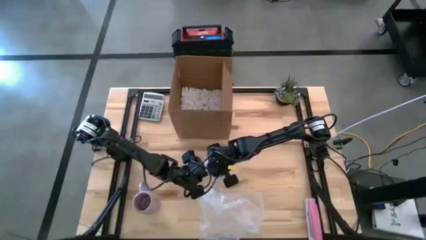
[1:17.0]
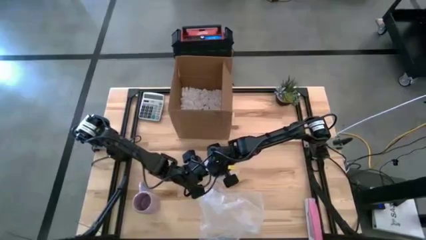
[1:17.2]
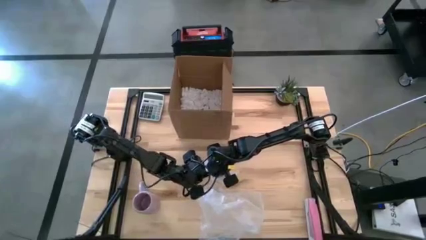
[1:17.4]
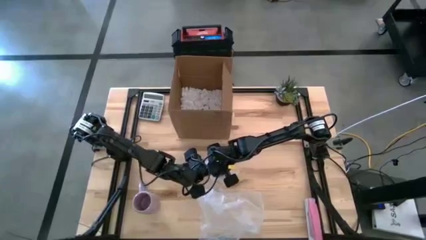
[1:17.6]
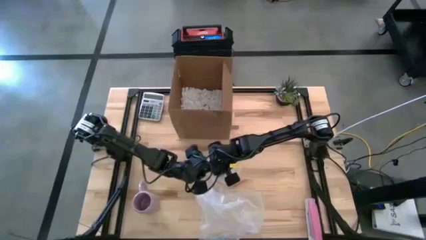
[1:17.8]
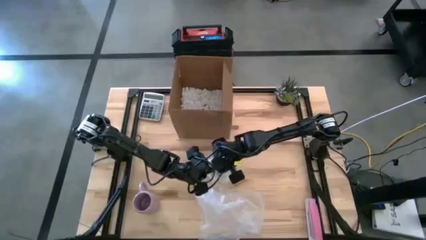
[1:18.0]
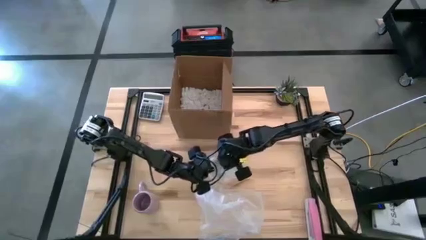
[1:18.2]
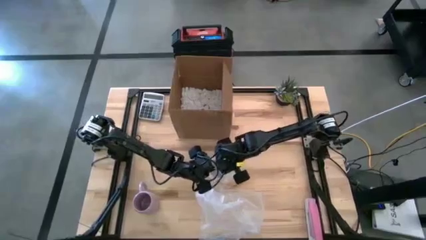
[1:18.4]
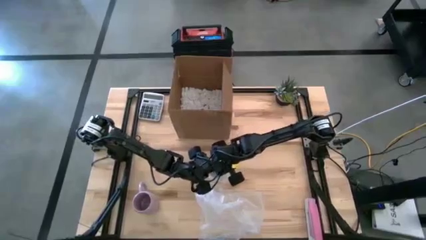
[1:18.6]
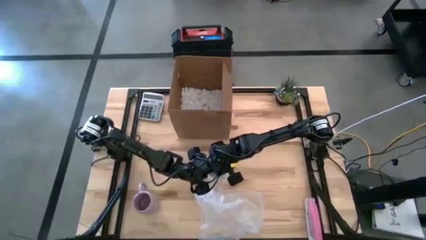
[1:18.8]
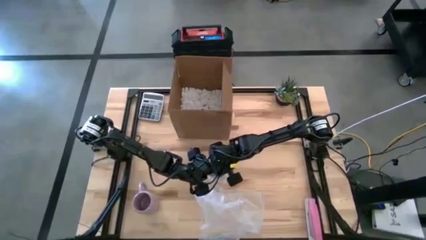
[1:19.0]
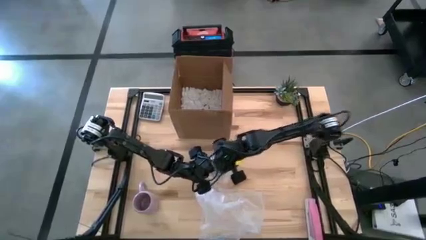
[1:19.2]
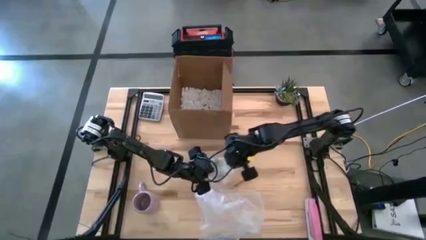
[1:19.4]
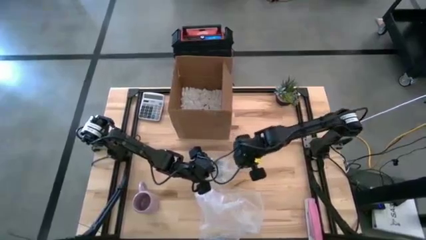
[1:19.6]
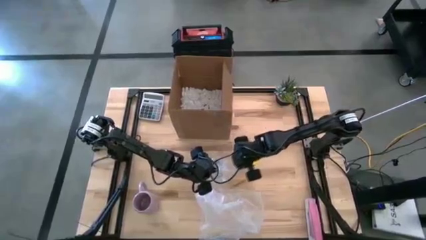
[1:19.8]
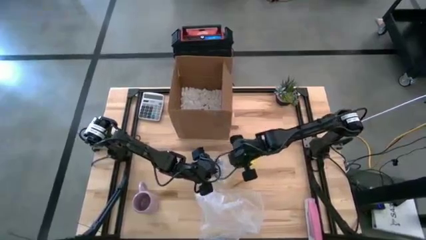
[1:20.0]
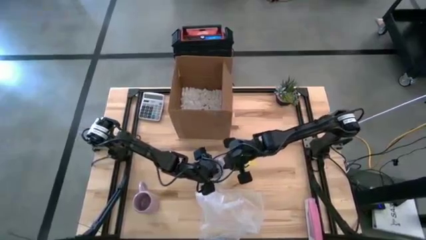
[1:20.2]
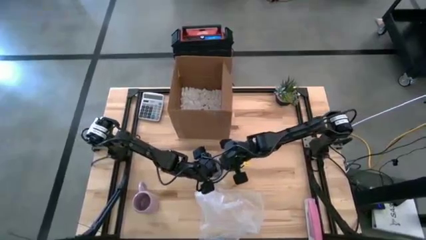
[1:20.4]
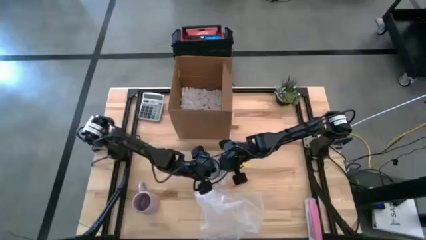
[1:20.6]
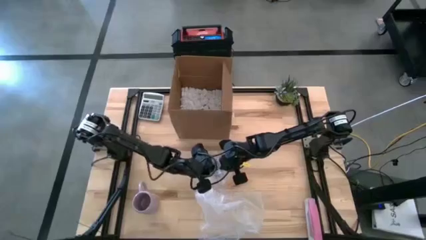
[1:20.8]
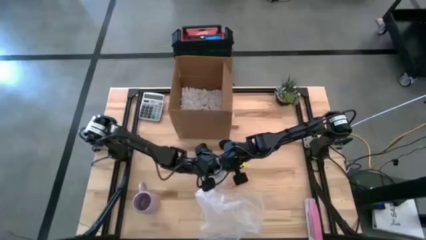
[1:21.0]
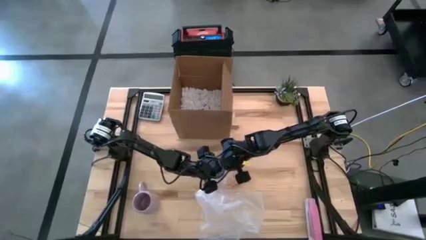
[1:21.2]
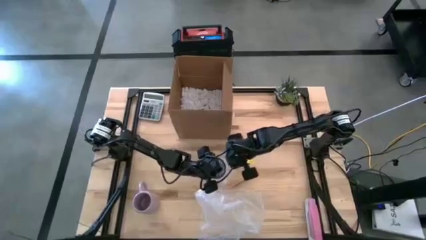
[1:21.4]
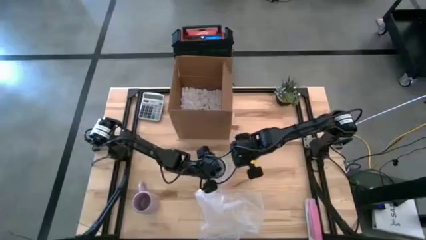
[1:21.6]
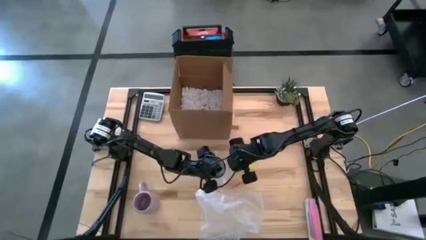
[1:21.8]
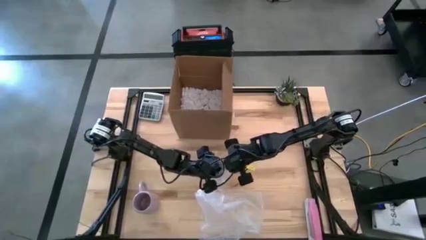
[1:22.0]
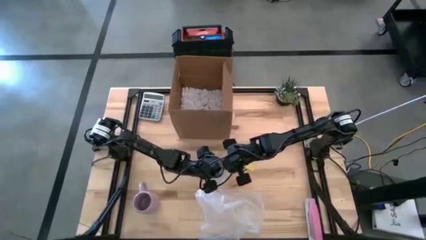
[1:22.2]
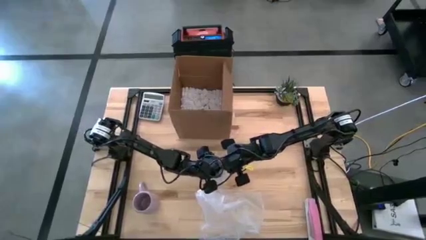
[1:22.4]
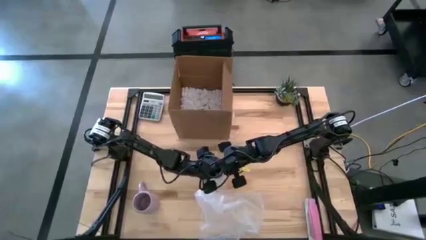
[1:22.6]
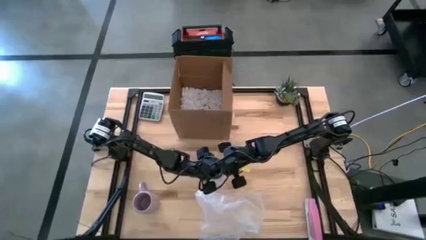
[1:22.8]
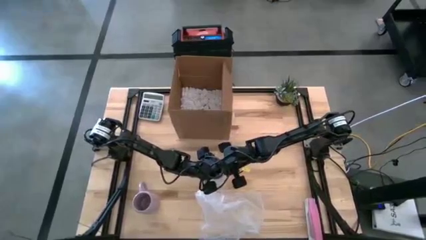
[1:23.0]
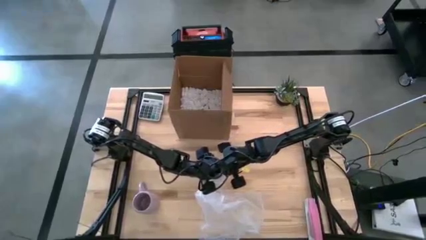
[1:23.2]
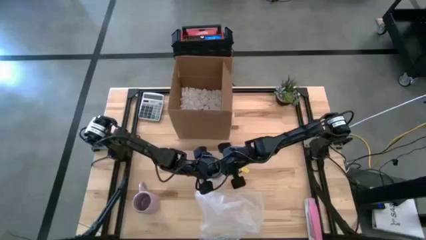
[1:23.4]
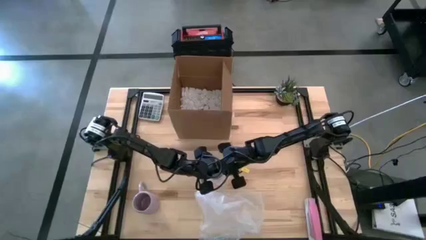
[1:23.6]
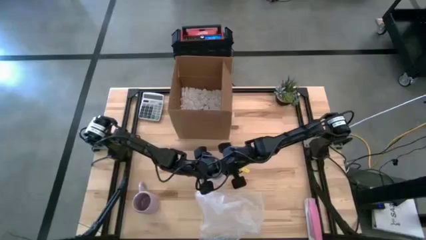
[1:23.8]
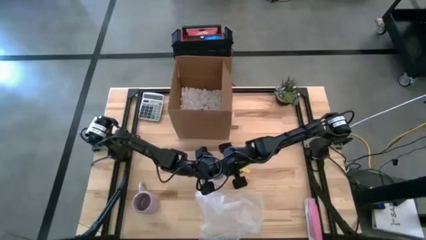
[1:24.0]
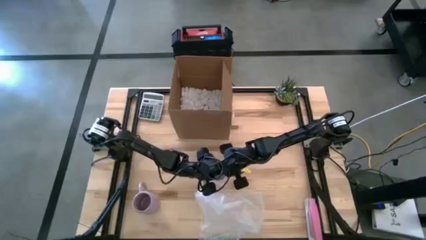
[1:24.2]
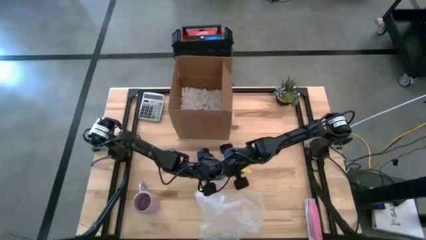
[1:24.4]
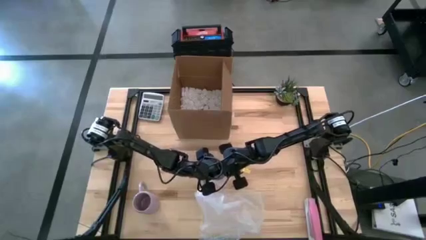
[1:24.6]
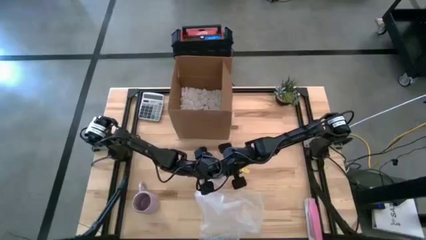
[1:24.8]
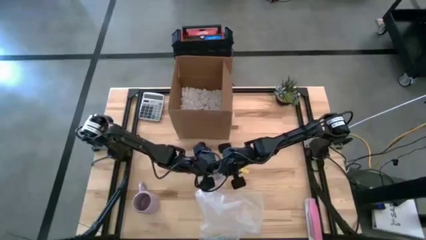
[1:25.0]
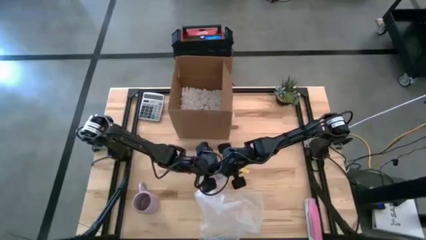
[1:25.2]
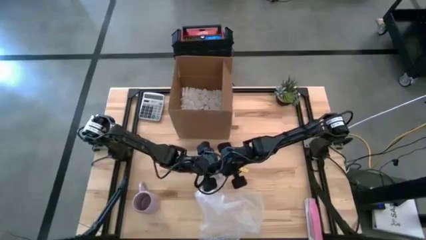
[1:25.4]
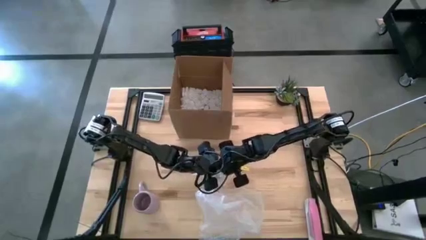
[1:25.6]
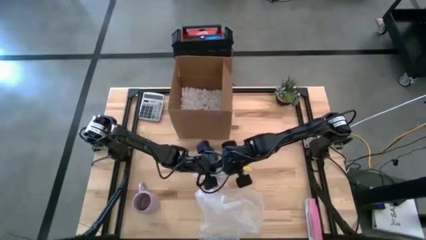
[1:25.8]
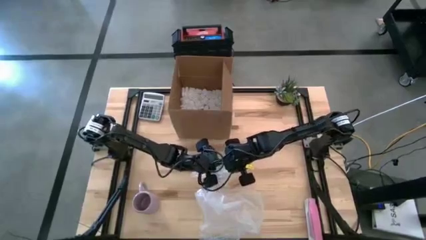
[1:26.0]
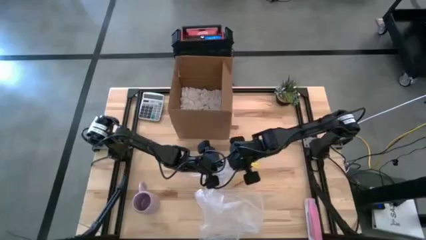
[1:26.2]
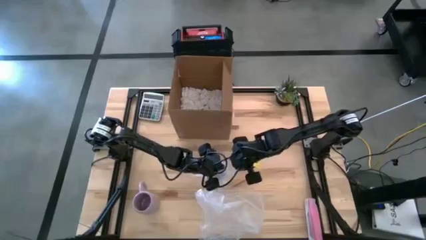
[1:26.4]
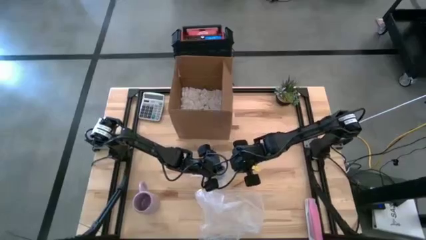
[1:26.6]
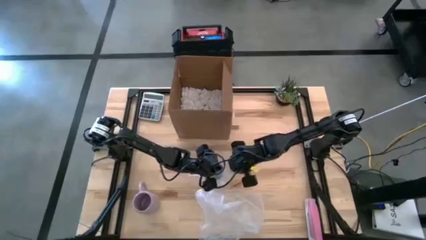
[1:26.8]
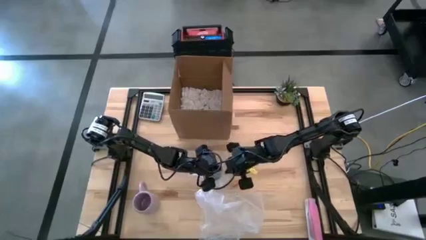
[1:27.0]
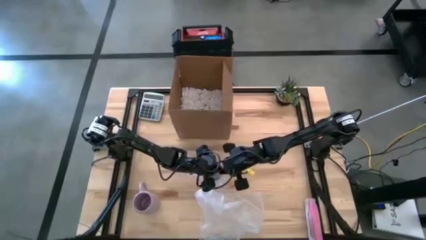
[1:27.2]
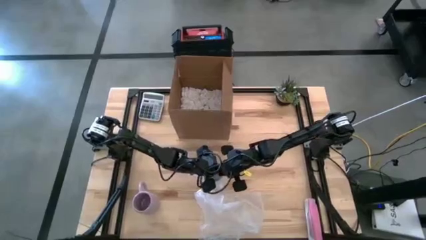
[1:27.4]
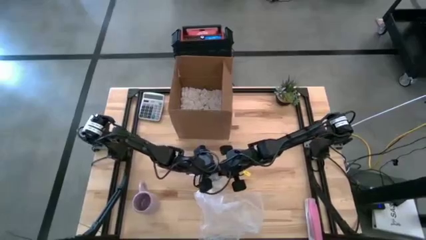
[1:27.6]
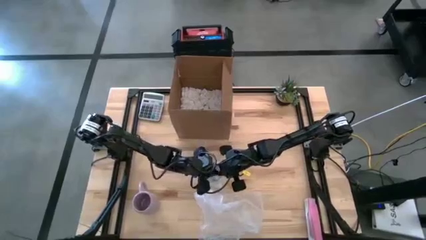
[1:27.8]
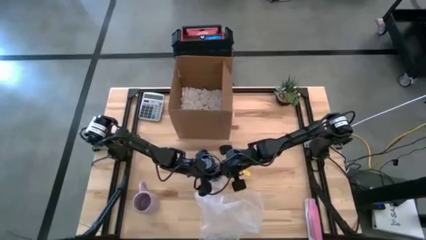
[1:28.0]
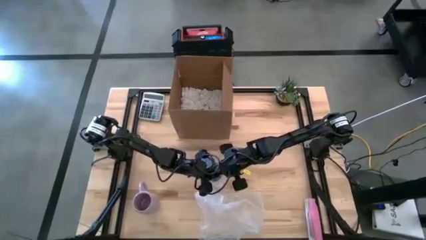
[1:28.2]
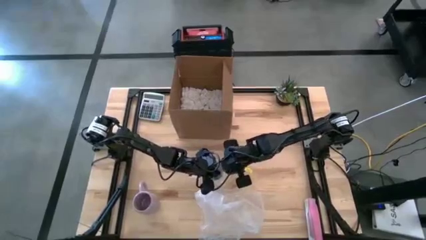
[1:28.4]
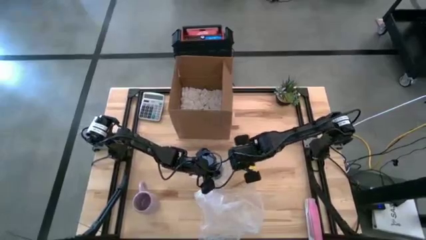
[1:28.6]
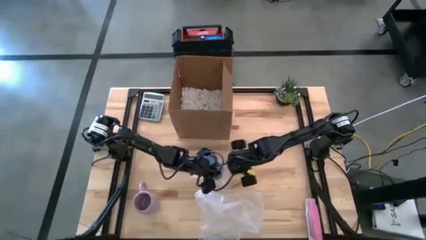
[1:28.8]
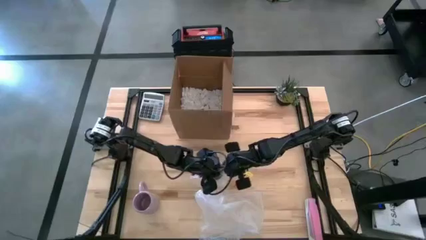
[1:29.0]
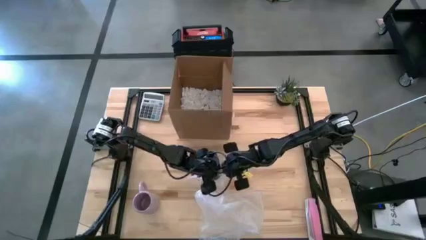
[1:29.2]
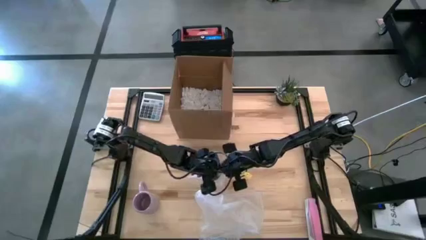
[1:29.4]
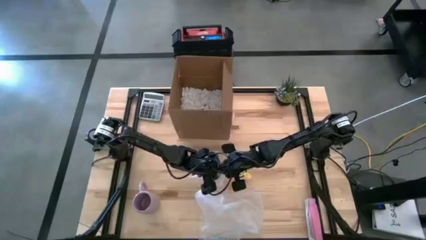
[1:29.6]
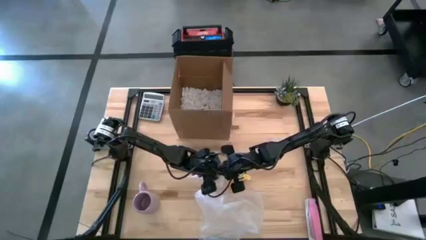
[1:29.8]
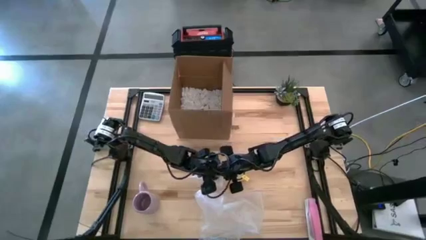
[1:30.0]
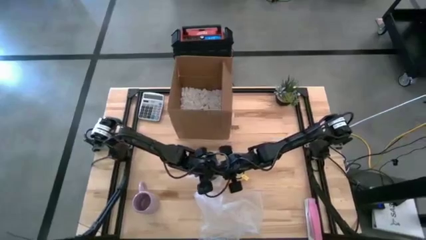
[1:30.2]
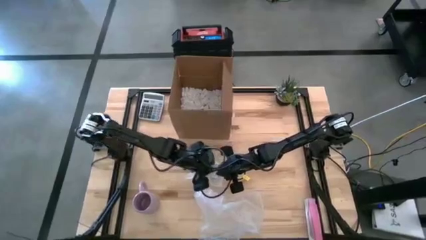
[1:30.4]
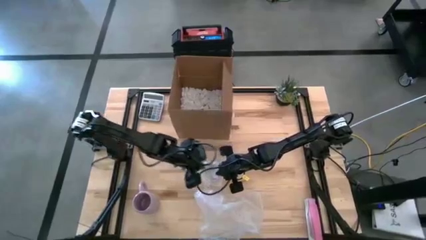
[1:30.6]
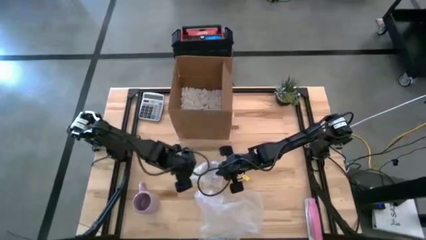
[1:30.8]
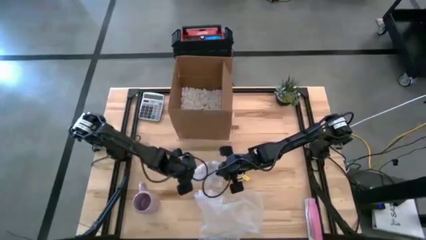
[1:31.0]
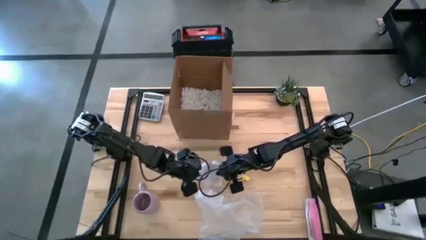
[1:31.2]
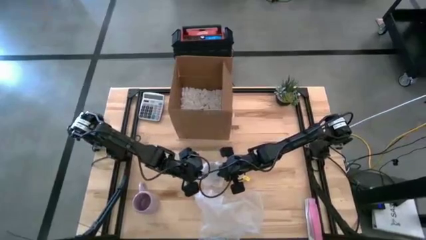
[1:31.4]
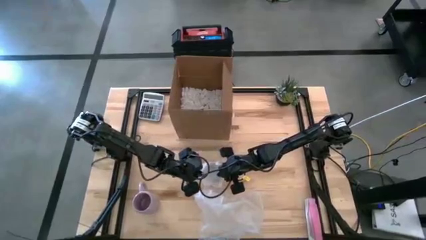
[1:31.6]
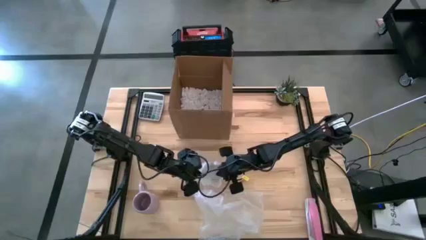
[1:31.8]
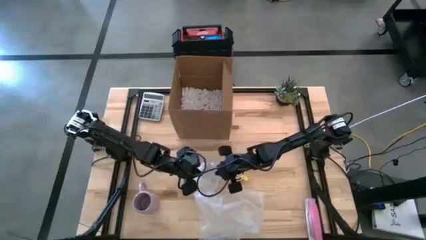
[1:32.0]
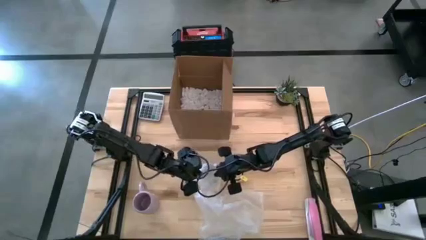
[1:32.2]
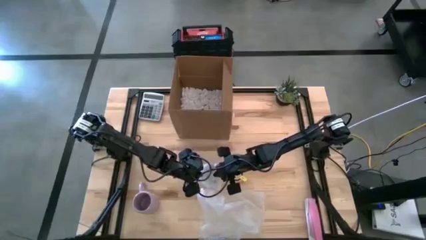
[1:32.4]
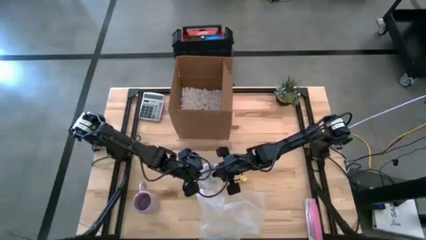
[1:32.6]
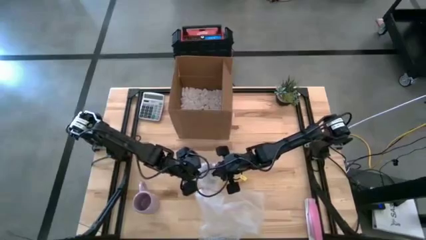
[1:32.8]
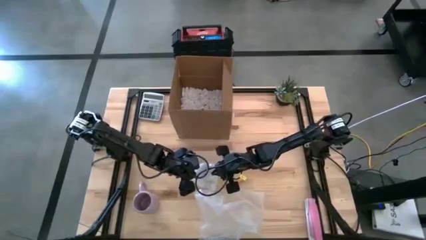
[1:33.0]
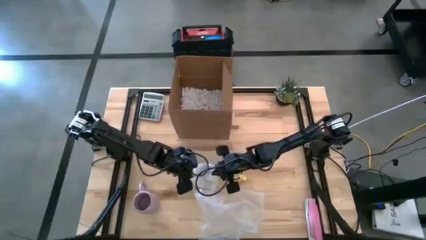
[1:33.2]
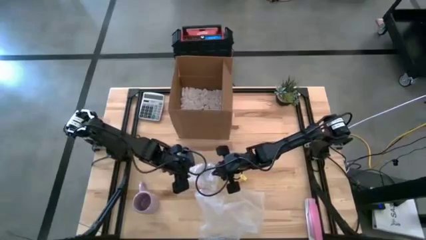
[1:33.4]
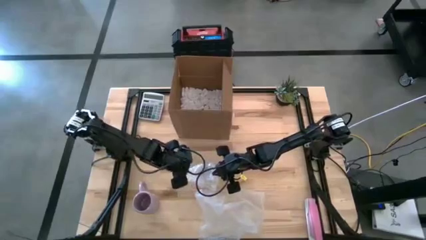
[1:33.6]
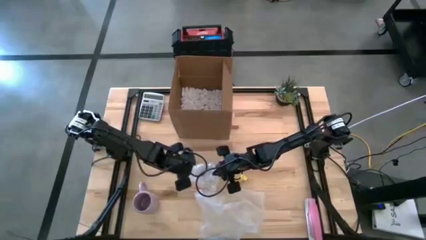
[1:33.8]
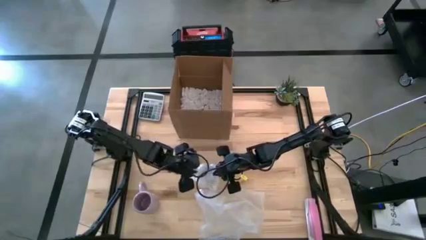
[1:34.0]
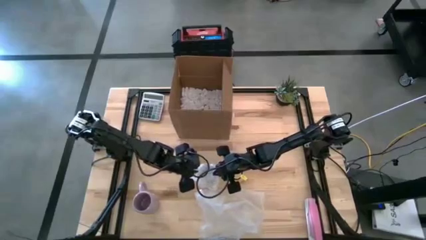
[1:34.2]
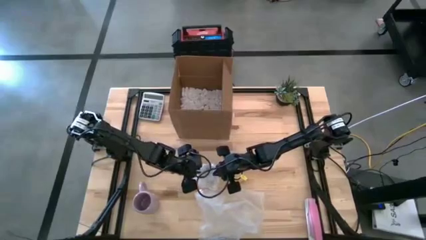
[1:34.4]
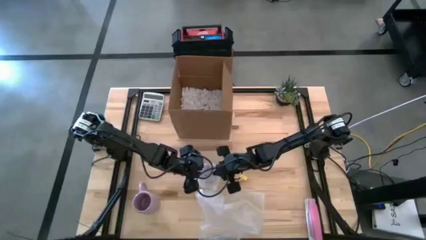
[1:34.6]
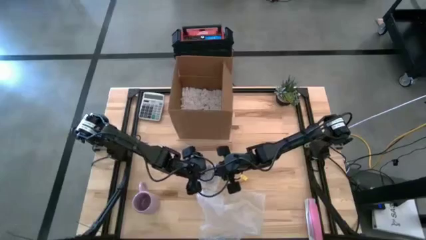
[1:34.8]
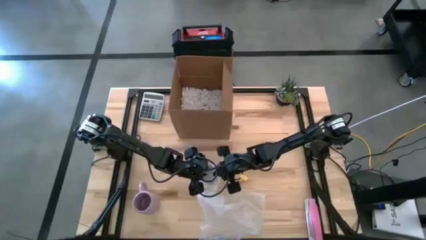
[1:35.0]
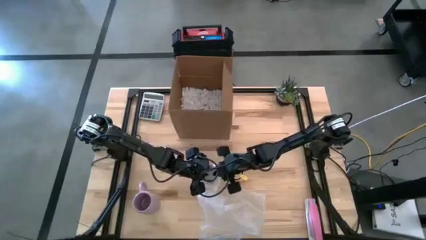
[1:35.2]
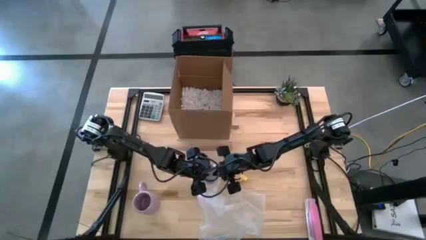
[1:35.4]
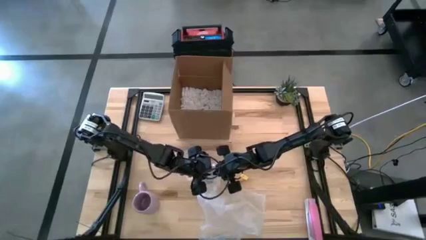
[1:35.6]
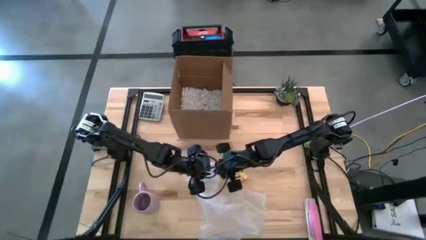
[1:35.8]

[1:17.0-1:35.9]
Task: wrap mug
Wrap the white mug with the bubble wrap
